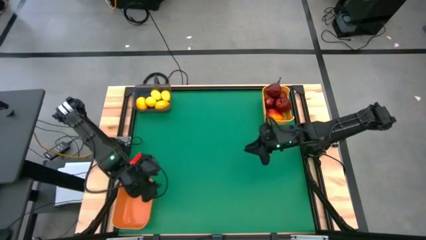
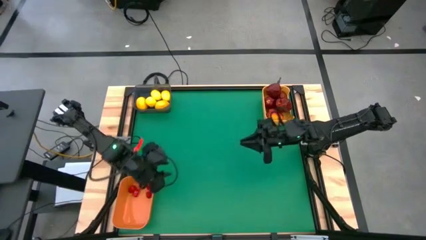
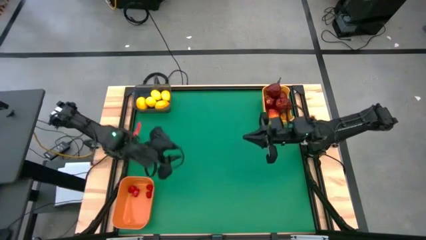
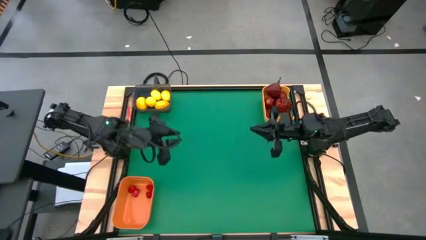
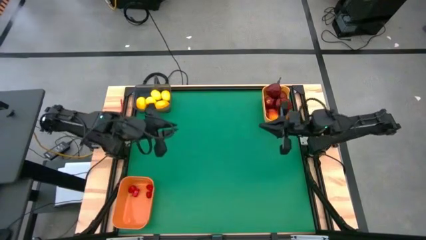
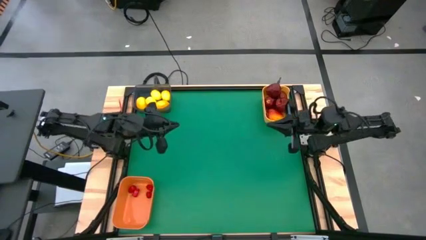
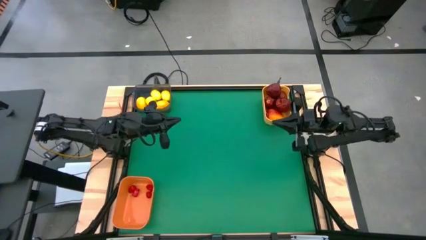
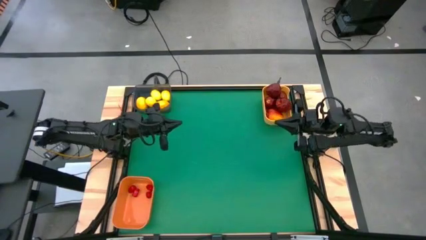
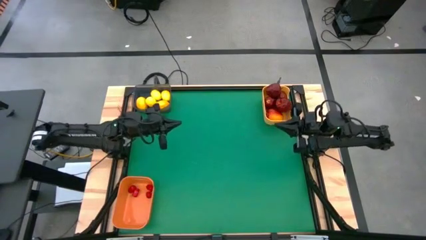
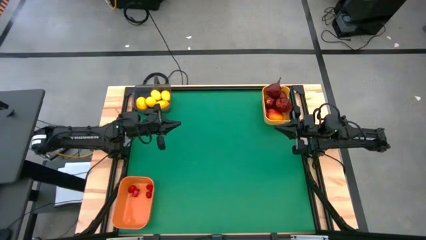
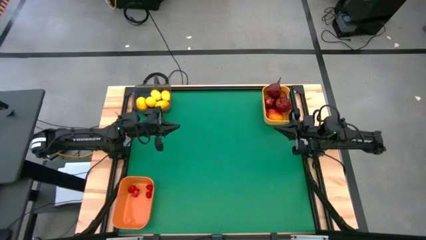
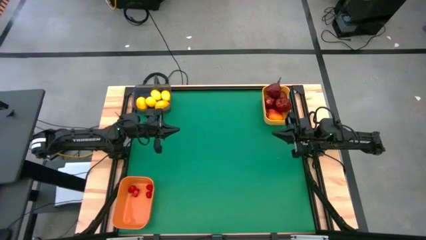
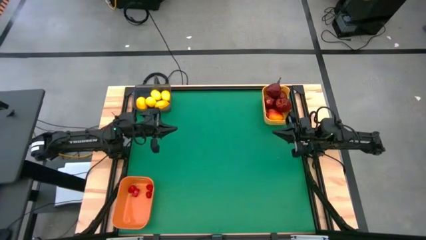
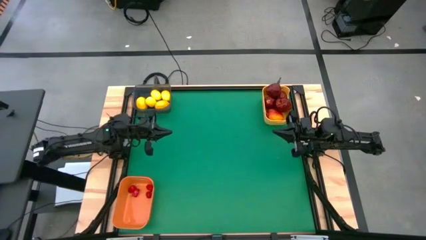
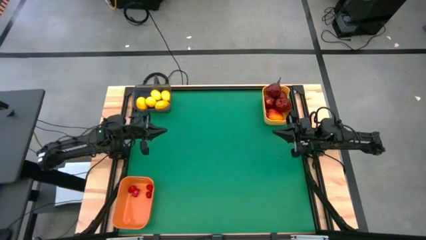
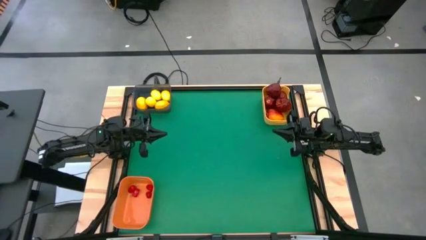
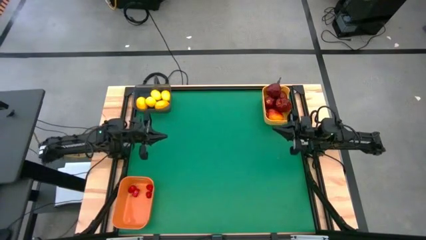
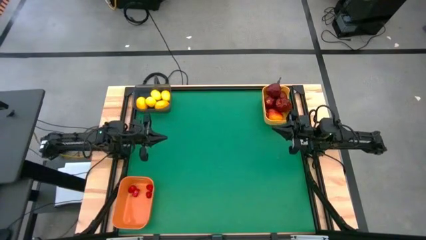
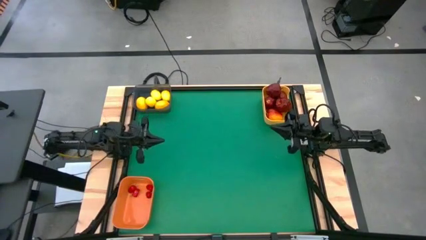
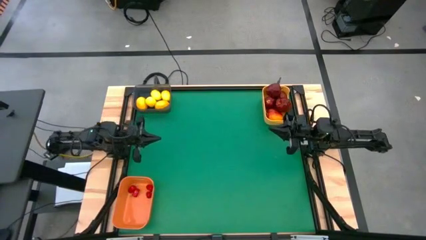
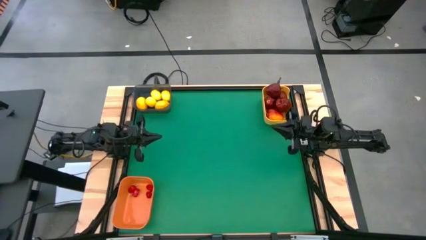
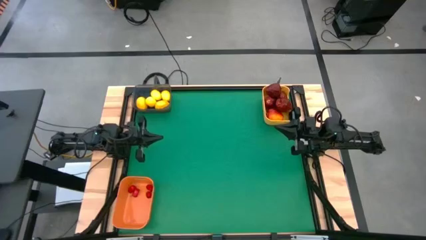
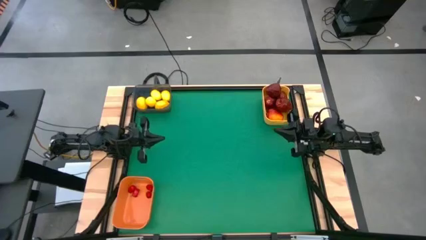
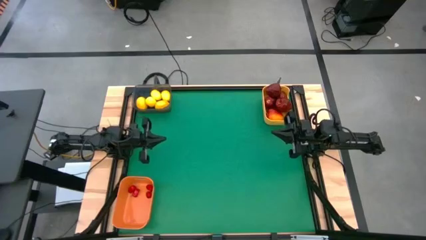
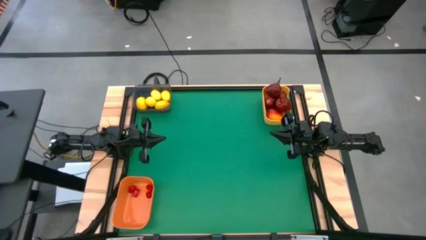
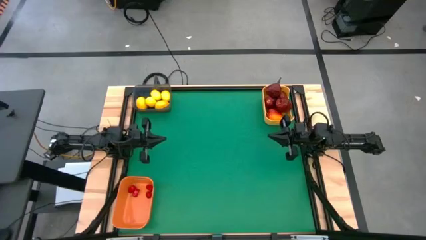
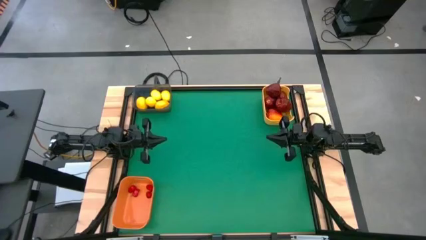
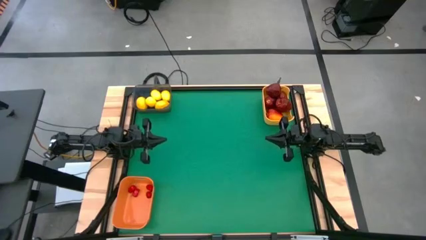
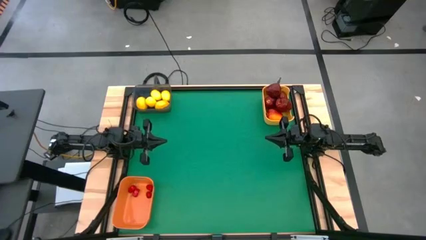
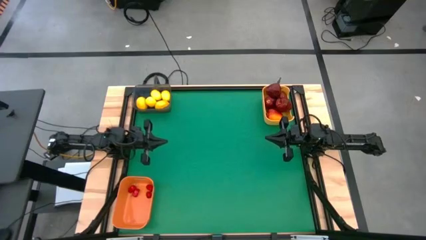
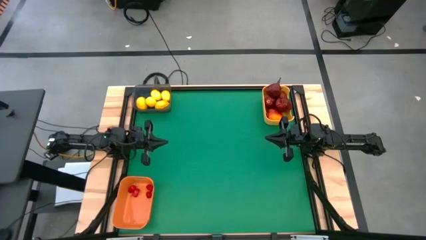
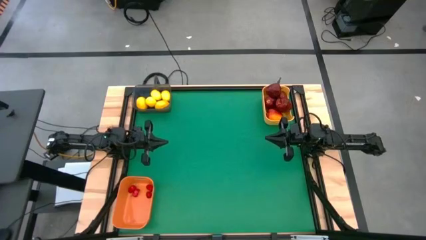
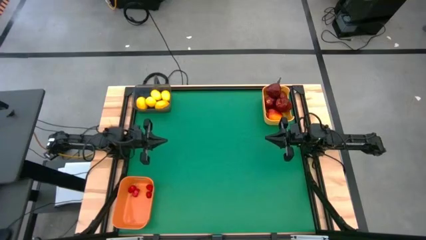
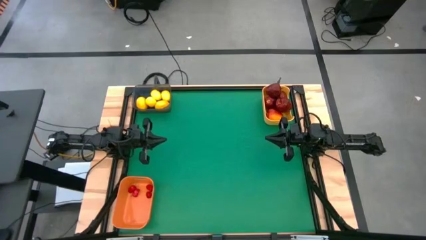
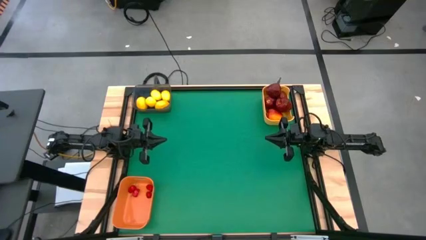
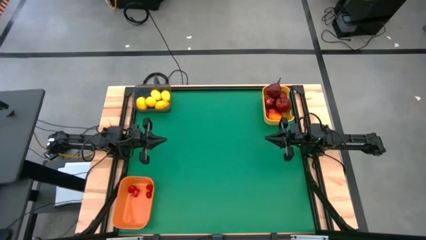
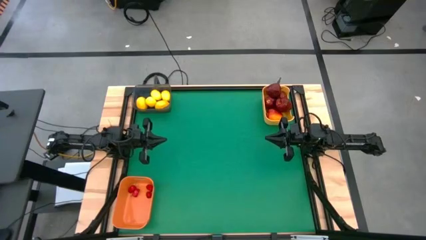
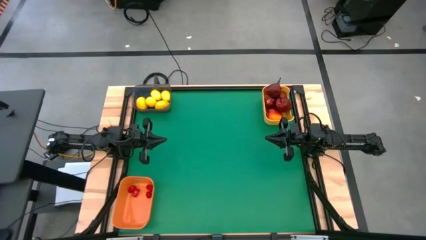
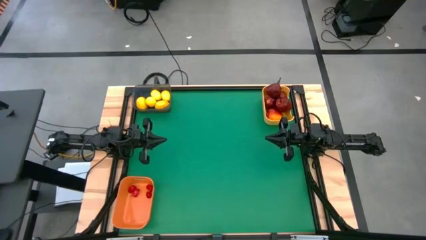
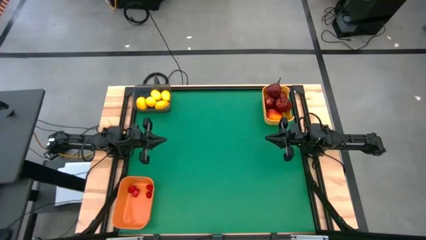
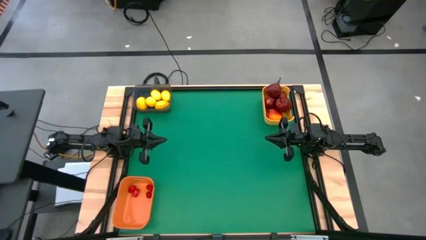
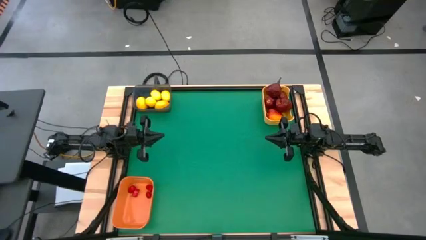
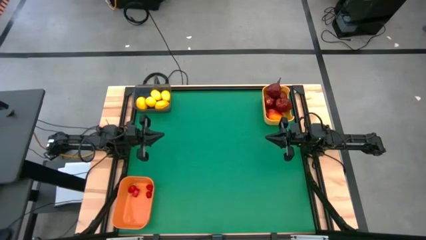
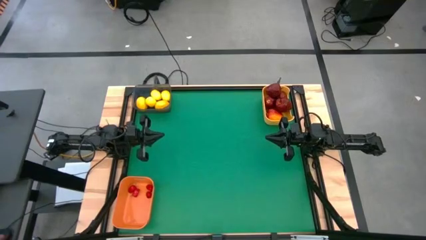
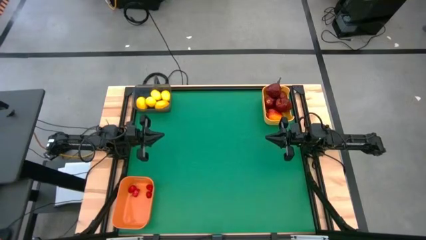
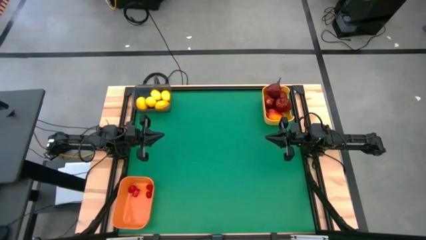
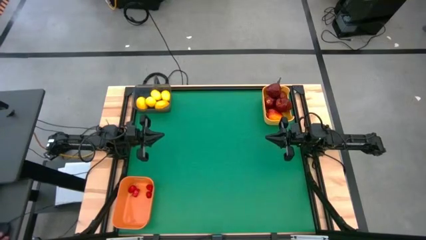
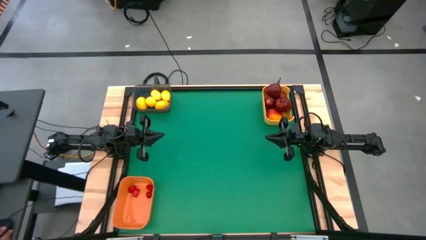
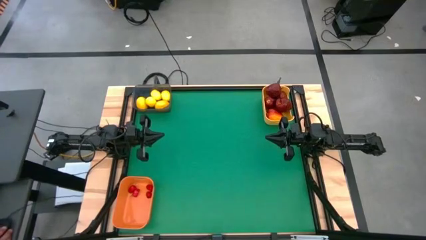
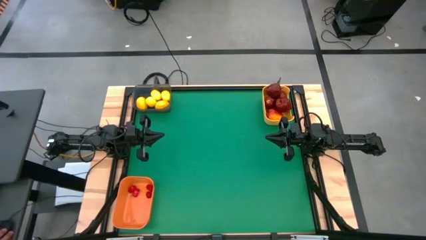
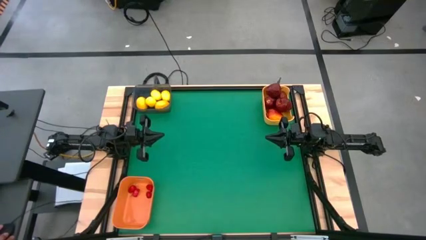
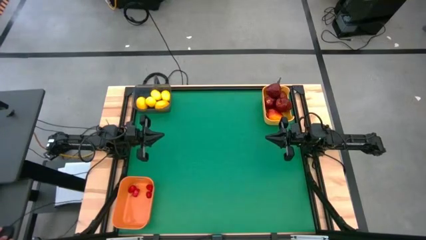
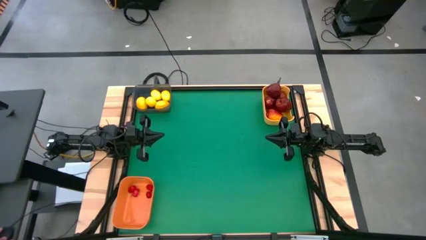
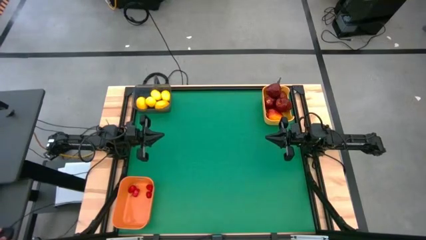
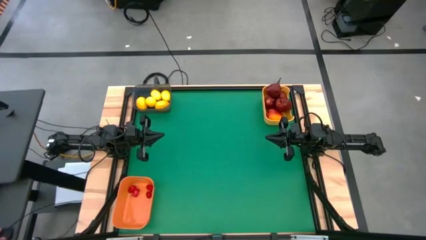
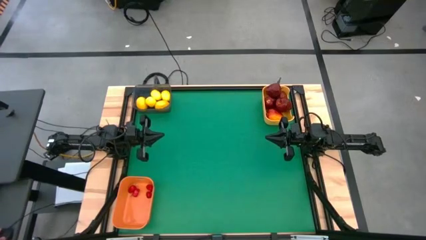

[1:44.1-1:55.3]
Task: Sort produce into baskets
Return to Home Position

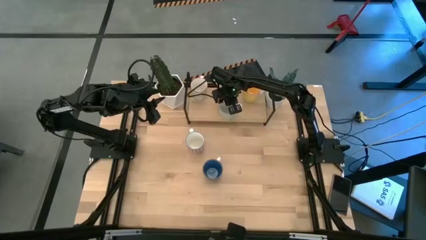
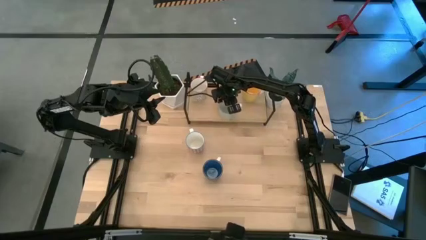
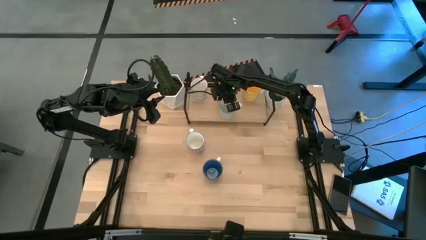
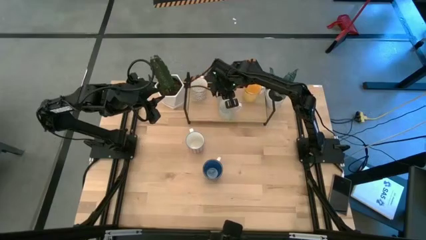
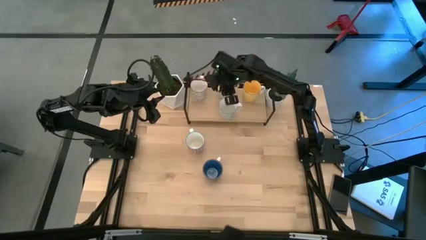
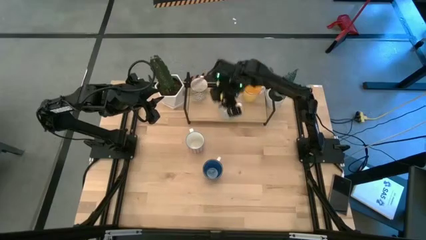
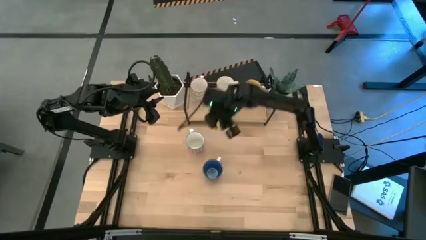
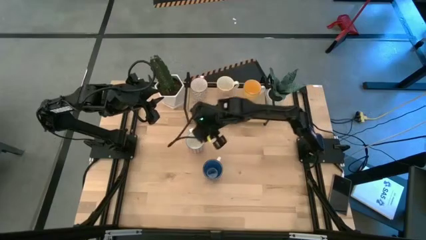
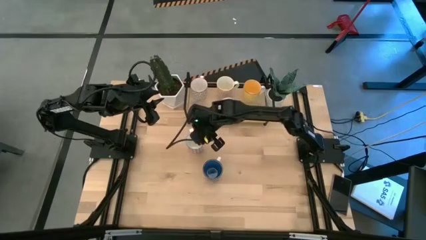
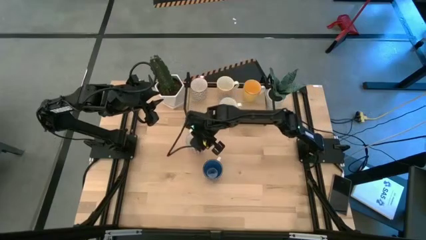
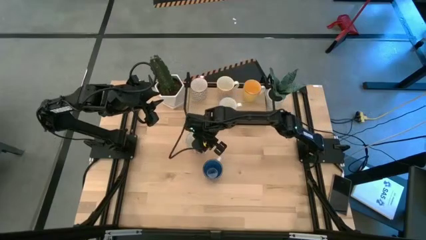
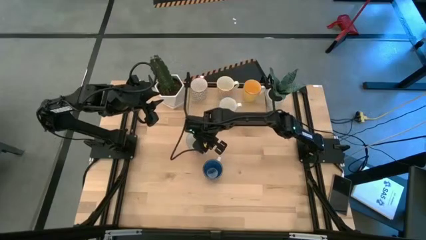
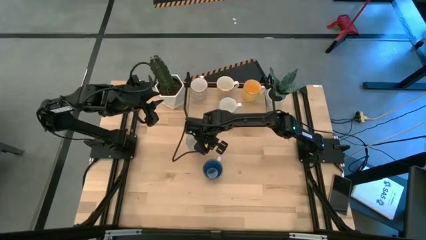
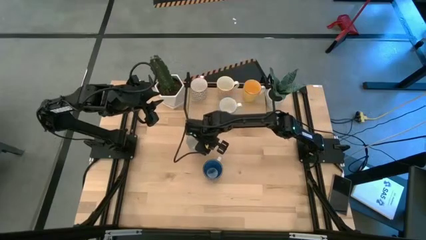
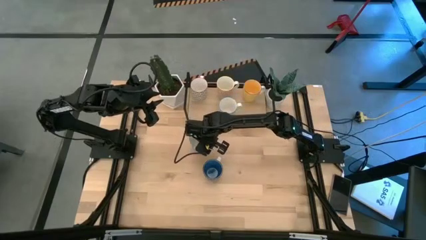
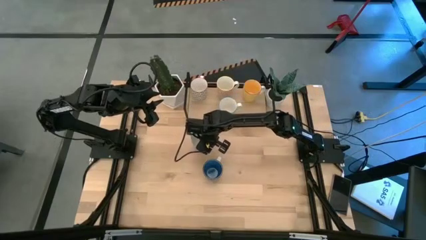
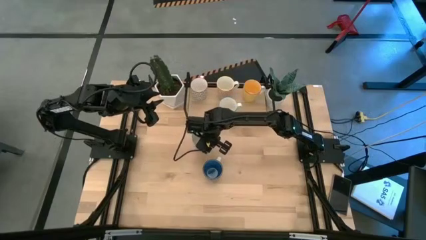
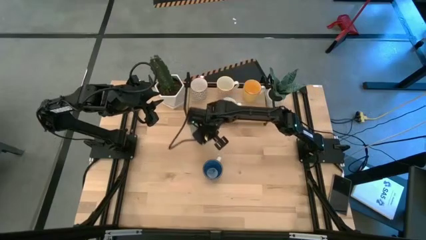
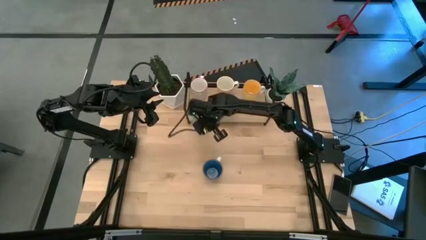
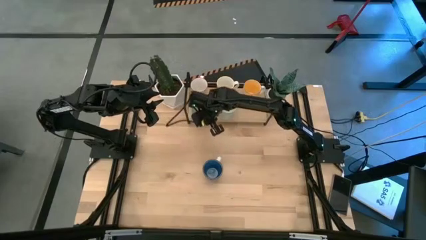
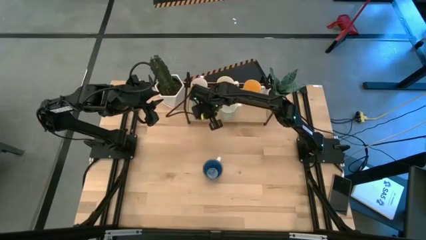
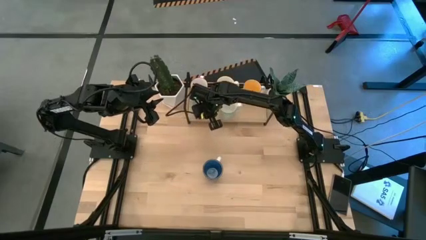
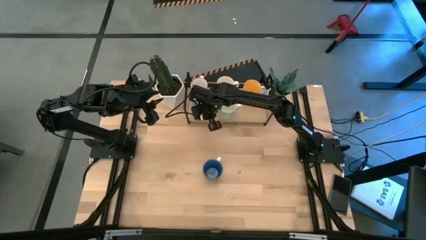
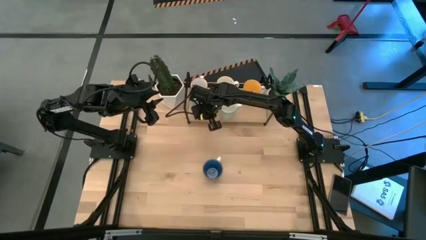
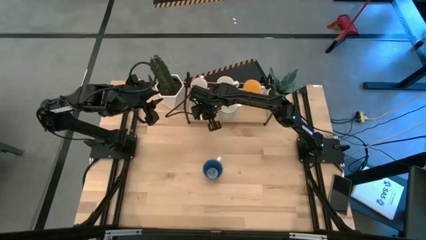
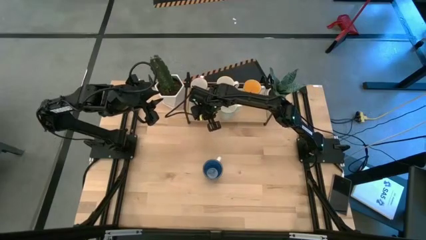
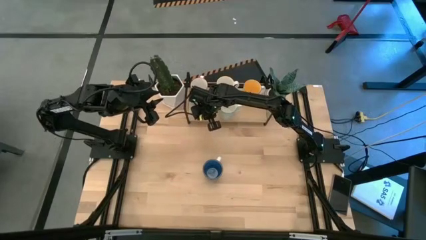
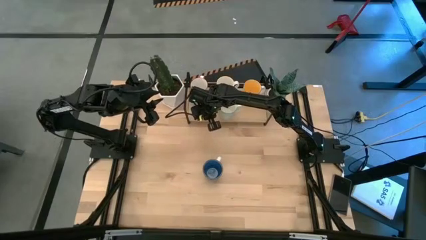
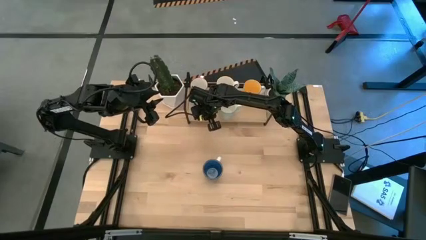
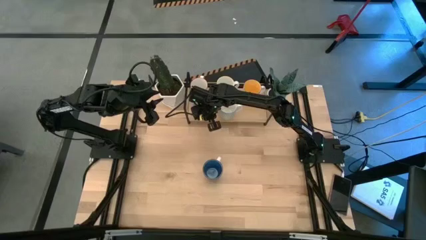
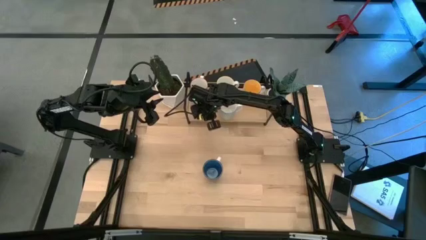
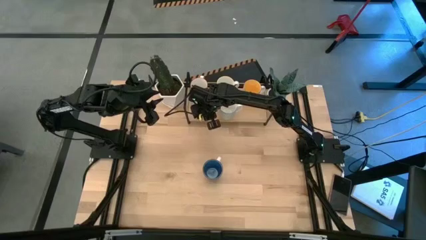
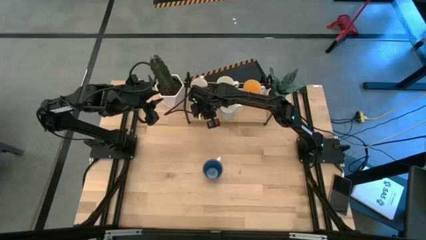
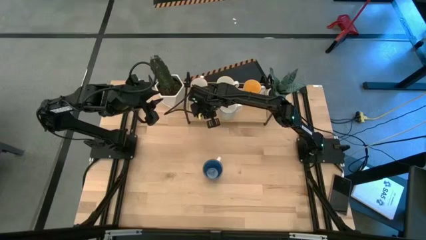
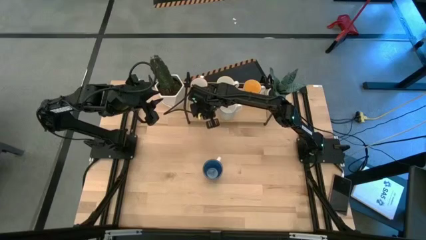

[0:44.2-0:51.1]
Task: Place coffee mugs
Put the red patterned mug on the shelf
